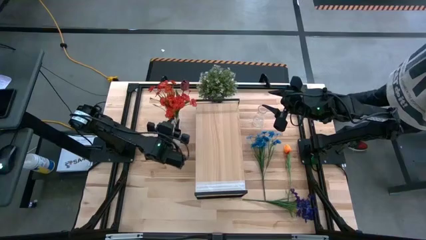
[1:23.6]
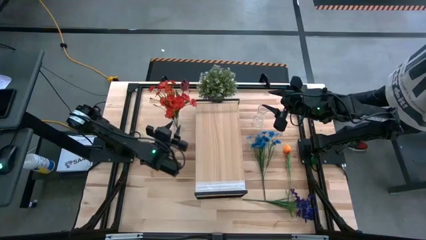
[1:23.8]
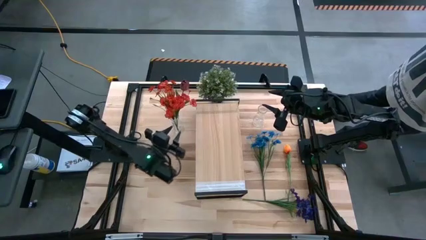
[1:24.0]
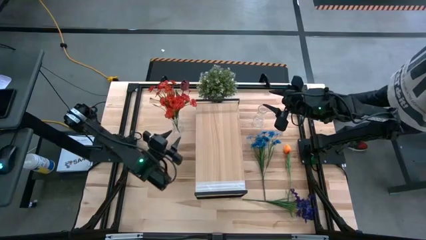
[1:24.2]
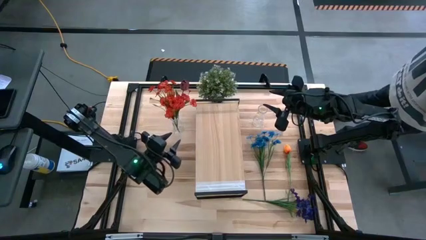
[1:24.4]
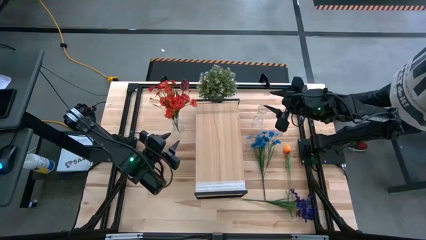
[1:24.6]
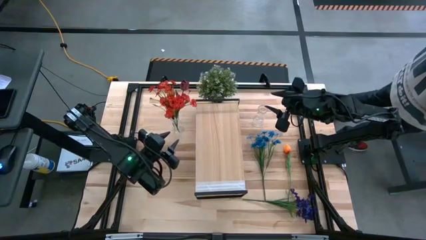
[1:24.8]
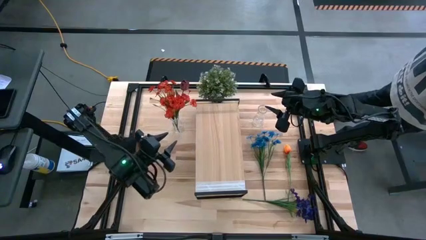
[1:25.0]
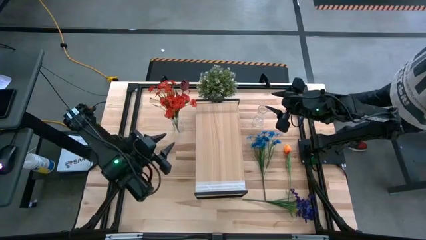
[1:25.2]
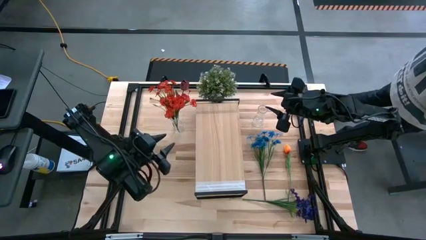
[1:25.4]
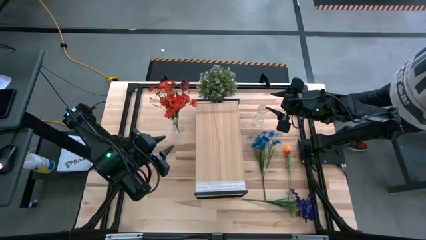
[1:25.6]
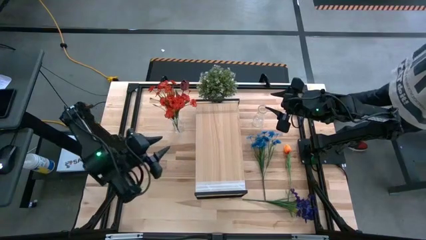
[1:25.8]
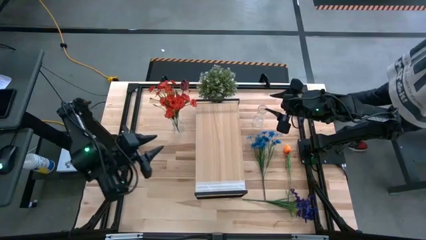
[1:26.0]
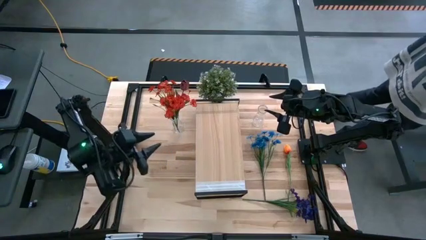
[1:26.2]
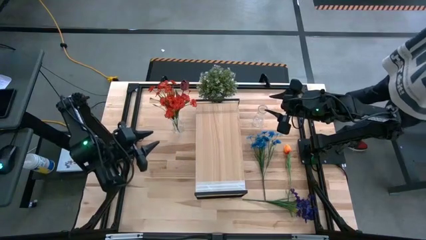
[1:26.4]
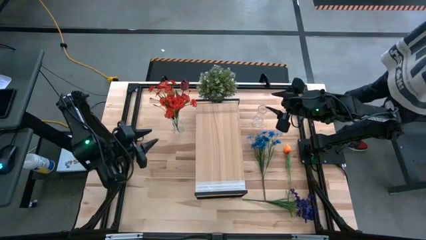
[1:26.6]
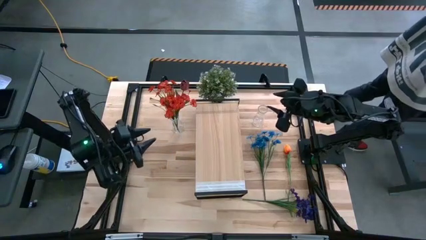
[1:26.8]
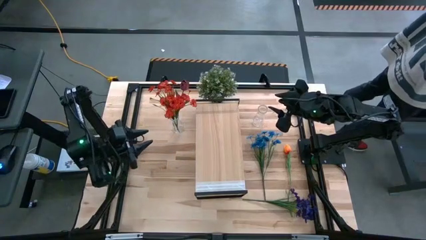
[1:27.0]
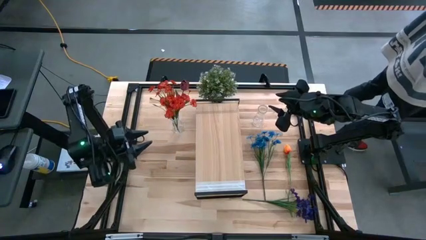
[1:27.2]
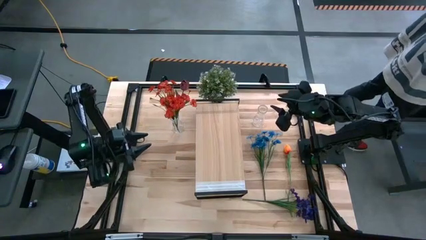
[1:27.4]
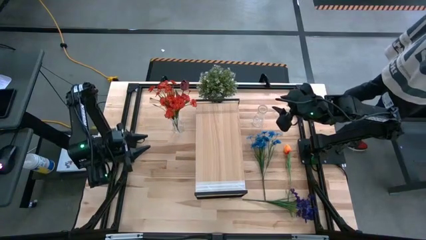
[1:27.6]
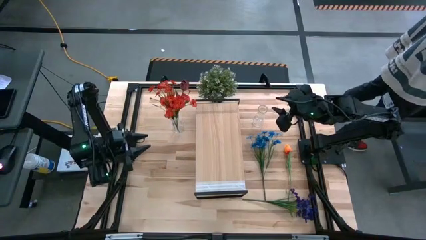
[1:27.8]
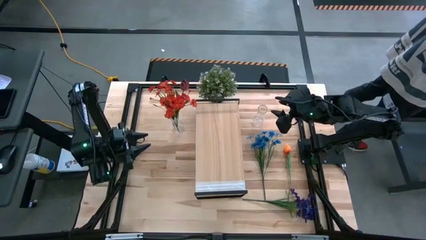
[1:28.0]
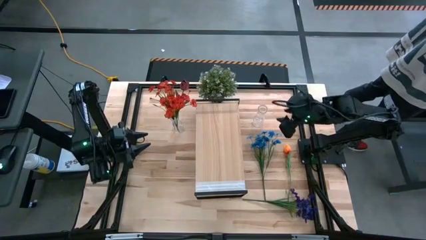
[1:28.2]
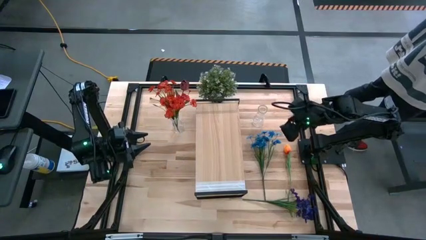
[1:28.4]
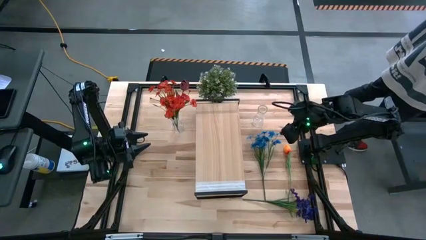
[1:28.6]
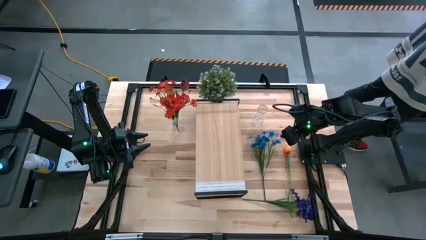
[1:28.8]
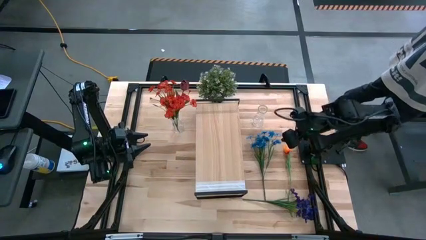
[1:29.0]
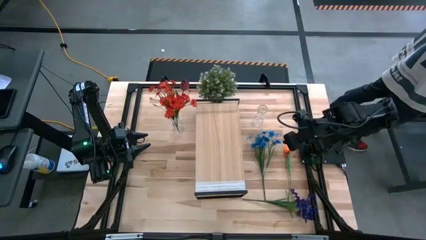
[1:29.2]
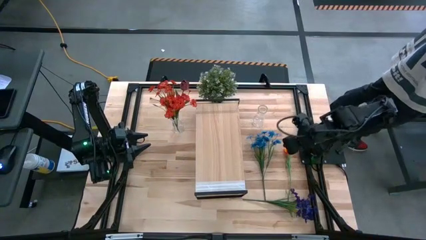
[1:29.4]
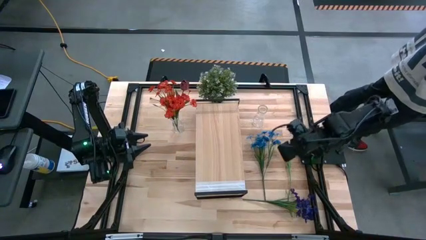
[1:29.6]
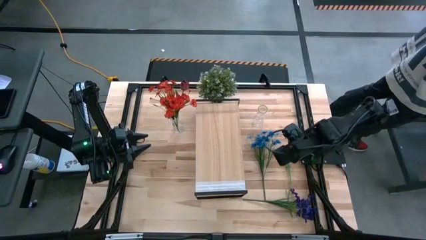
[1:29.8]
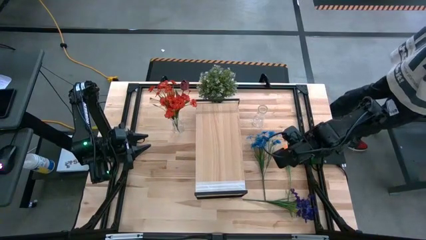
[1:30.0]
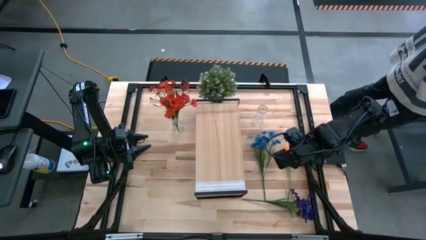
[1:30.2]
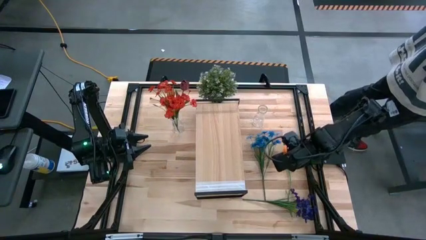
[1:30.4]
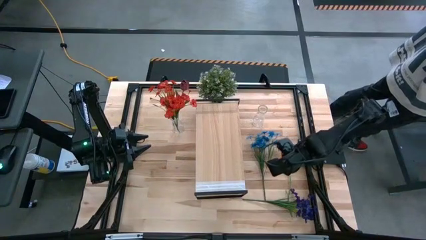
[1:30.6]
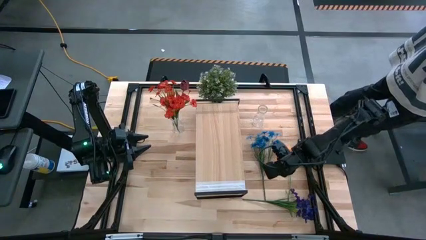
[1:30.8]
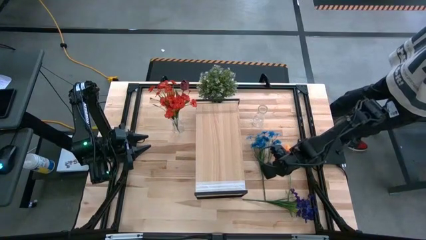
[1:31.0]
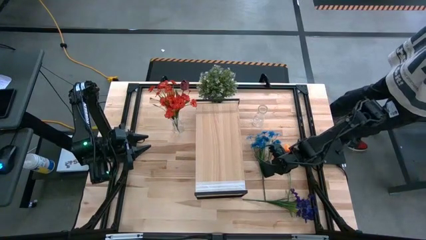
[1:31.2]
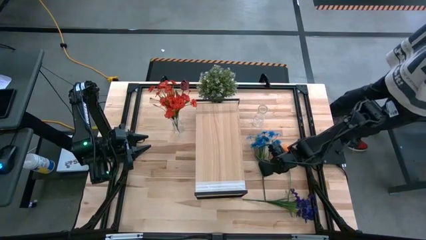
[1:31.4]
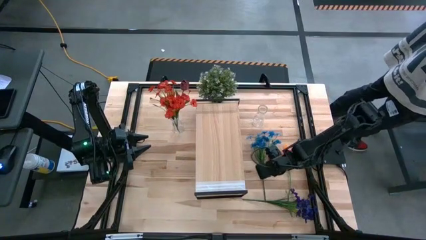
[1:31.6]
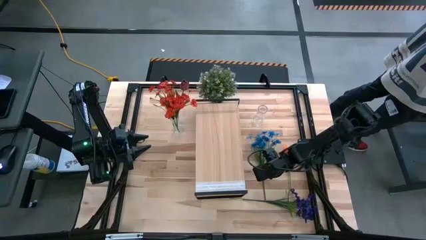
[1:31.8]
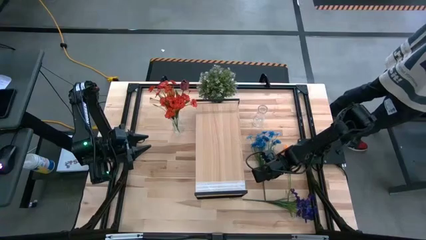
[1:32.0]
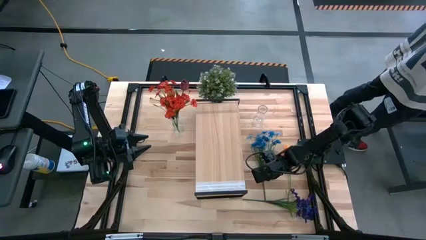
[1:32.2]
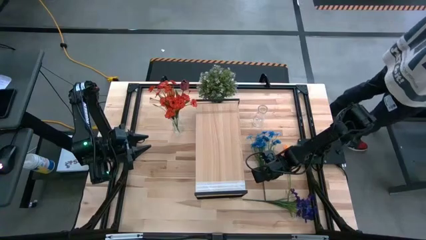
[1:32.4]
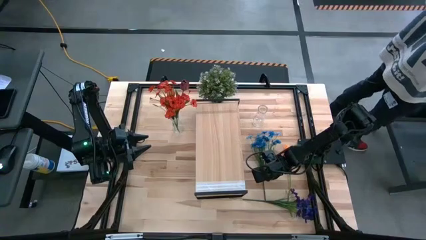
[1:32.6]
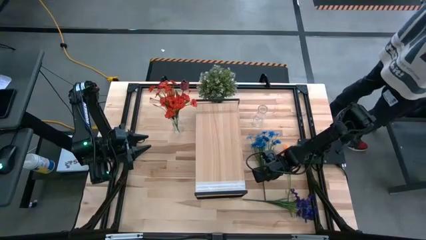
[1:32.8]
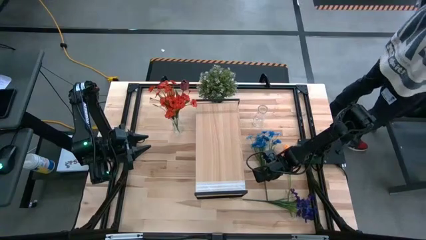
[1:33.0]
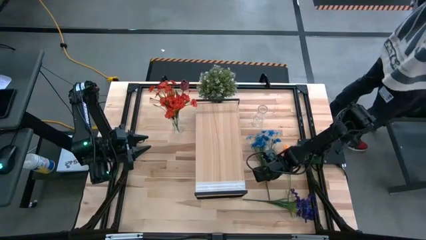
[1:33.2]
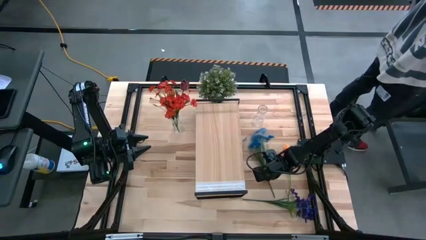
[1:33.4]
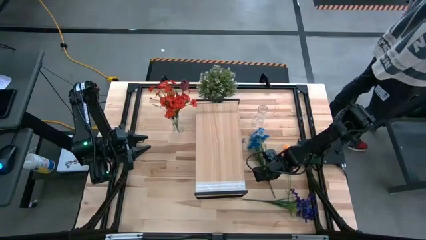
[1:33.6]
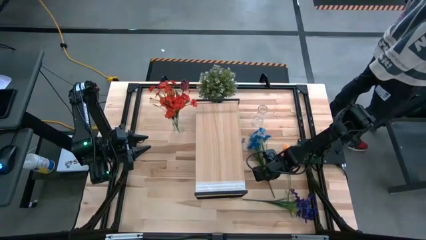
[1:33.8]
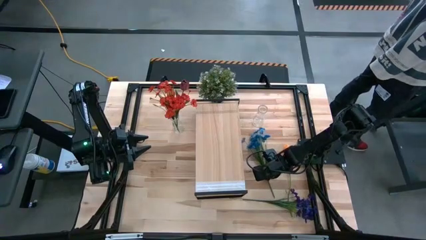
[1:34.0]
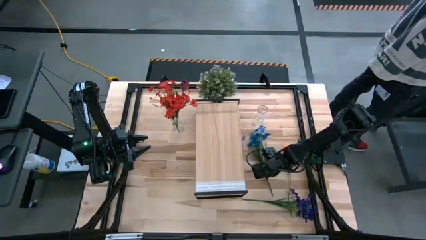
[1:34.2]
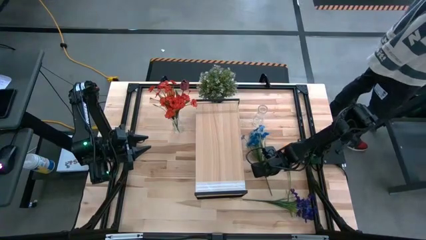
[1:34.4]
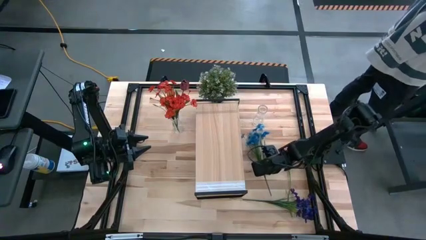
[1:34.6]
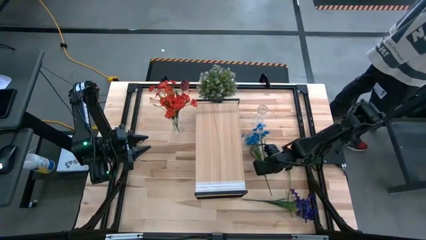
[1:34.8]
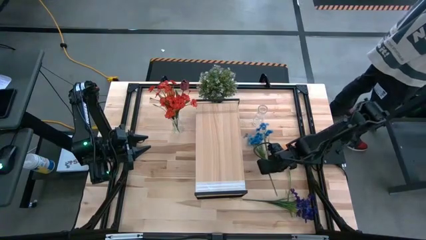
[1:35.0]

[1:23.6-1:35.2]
Task: Pick and place flowers into a vace then onto a shelf
Put the blue flowers into the right transparent vase
